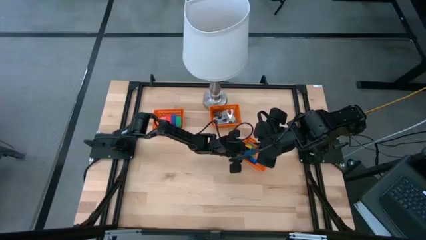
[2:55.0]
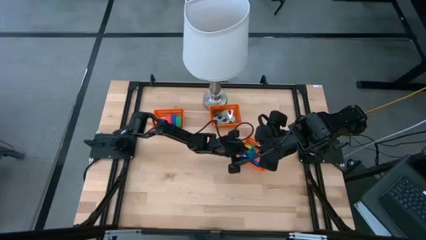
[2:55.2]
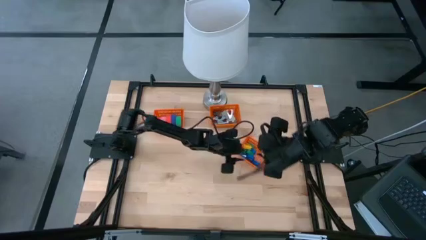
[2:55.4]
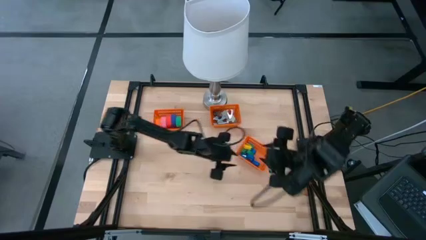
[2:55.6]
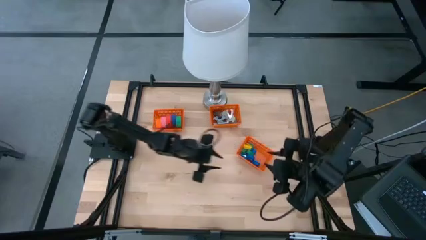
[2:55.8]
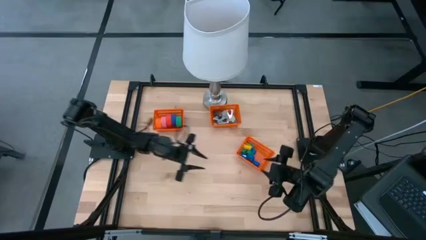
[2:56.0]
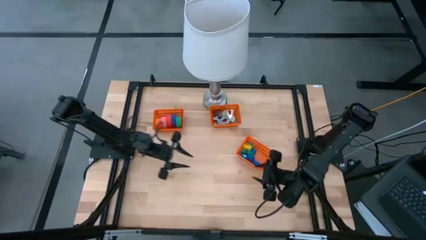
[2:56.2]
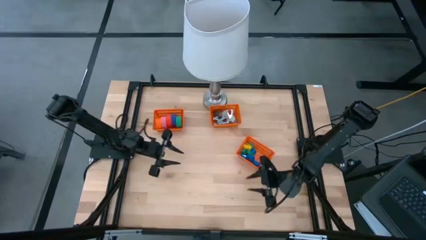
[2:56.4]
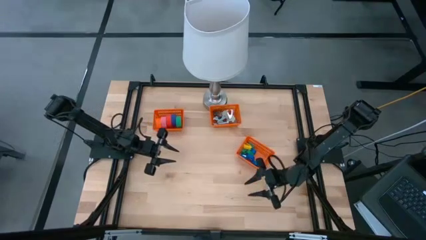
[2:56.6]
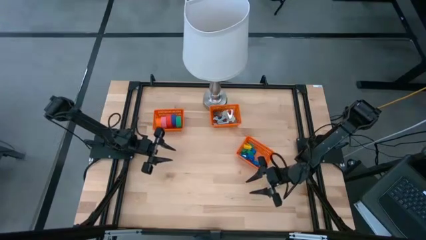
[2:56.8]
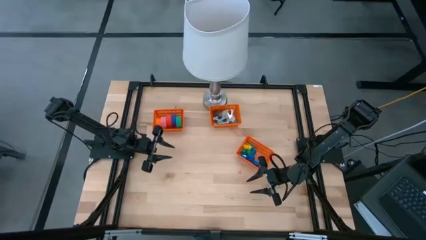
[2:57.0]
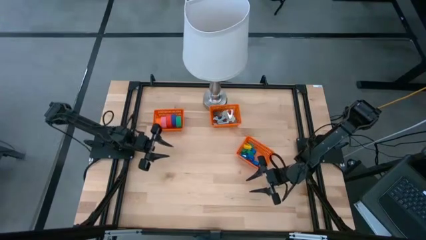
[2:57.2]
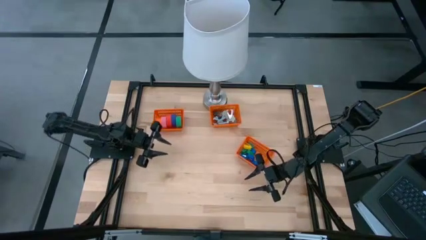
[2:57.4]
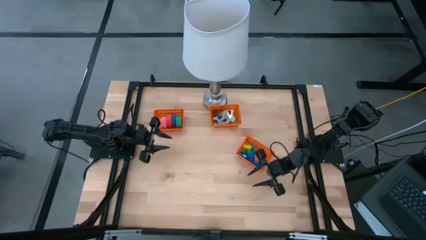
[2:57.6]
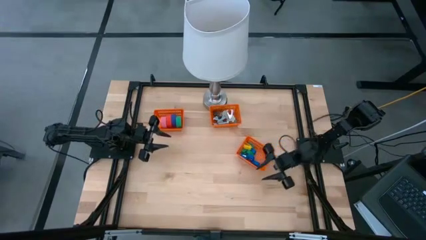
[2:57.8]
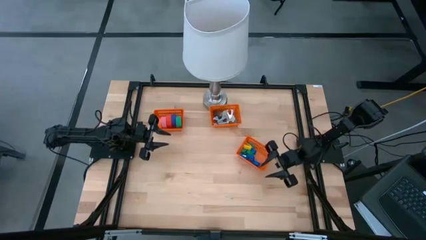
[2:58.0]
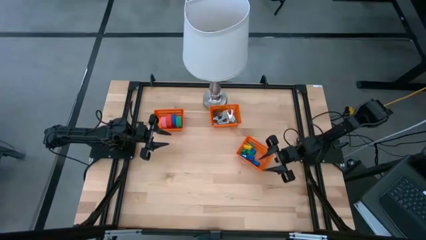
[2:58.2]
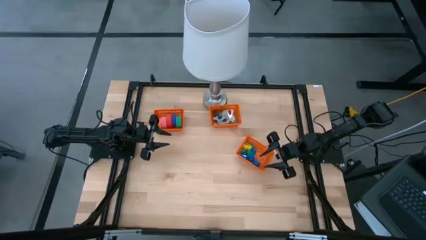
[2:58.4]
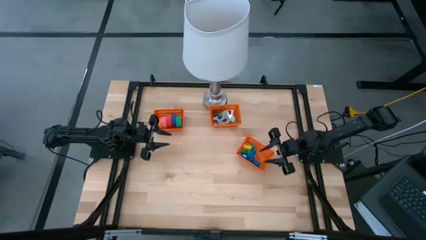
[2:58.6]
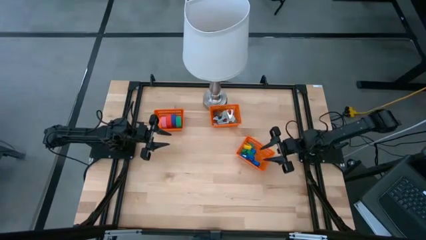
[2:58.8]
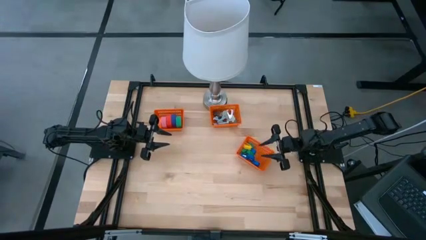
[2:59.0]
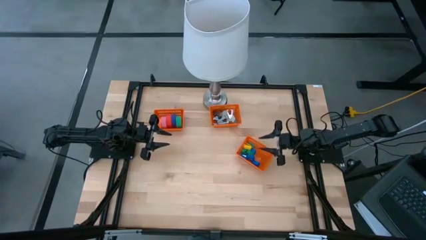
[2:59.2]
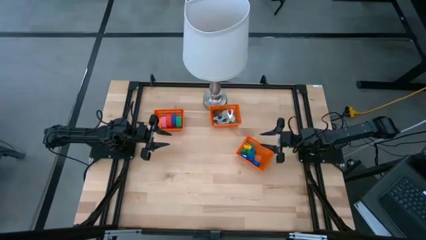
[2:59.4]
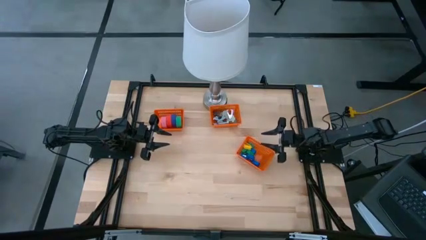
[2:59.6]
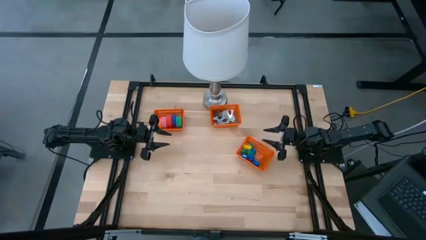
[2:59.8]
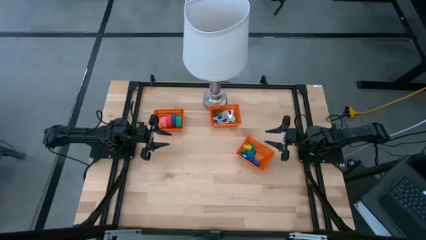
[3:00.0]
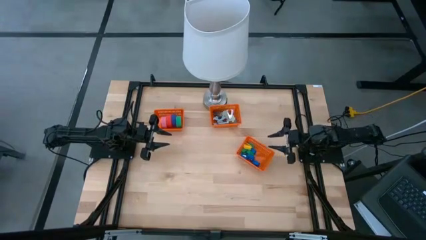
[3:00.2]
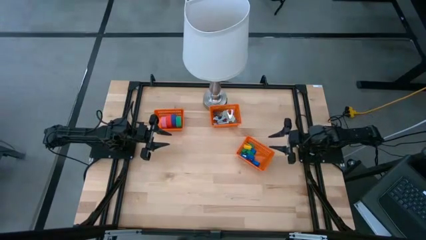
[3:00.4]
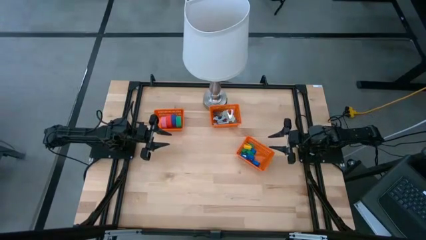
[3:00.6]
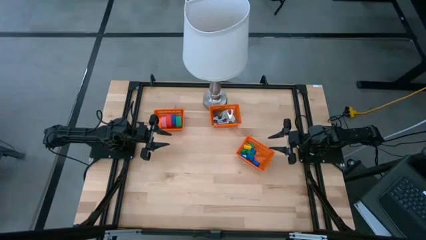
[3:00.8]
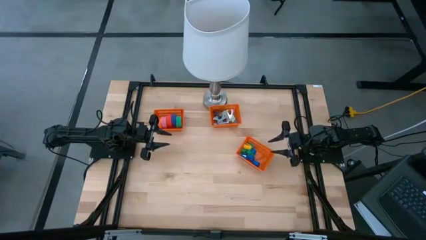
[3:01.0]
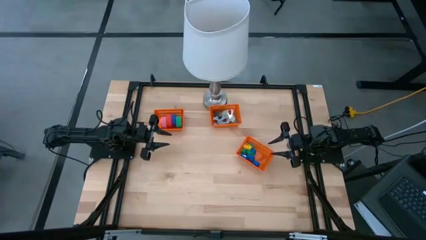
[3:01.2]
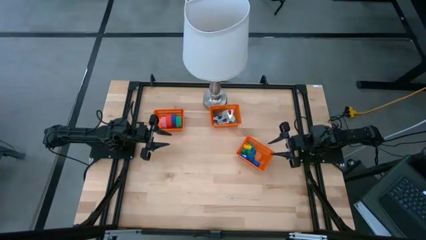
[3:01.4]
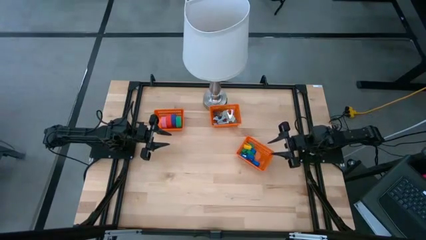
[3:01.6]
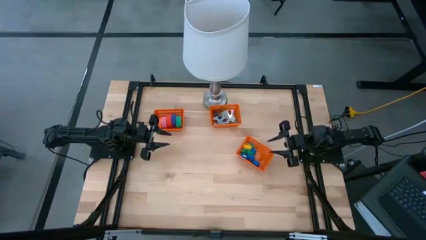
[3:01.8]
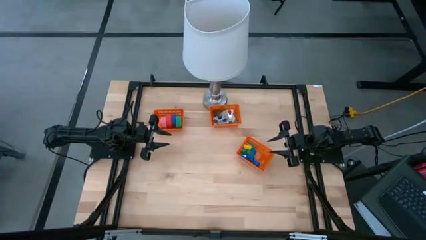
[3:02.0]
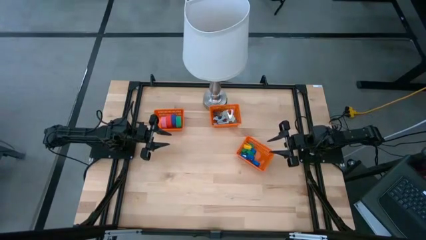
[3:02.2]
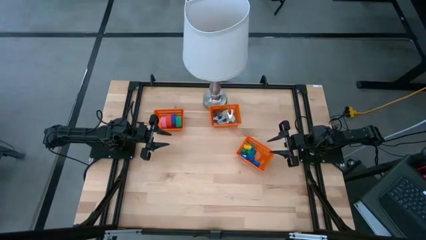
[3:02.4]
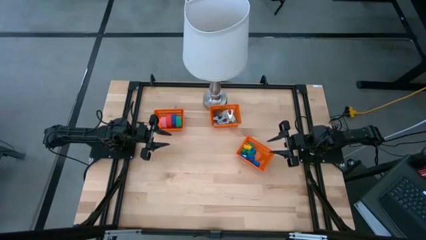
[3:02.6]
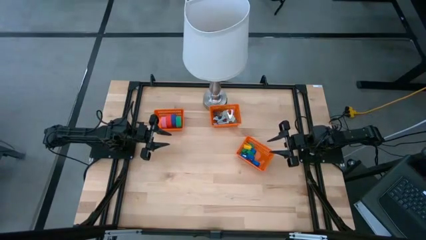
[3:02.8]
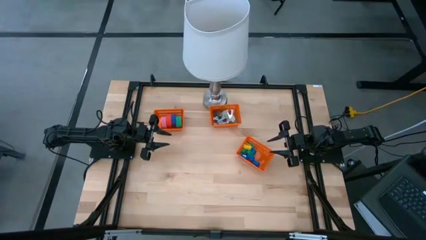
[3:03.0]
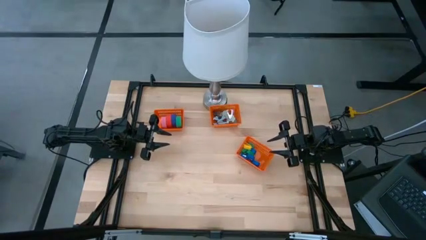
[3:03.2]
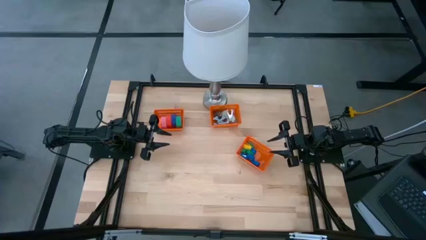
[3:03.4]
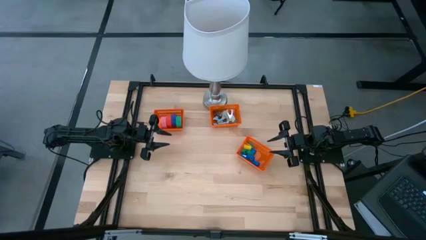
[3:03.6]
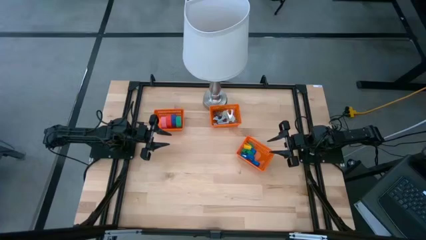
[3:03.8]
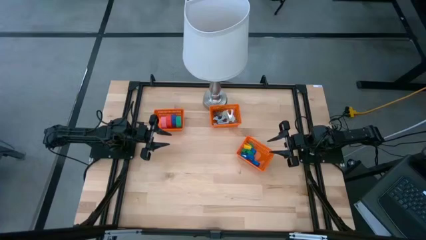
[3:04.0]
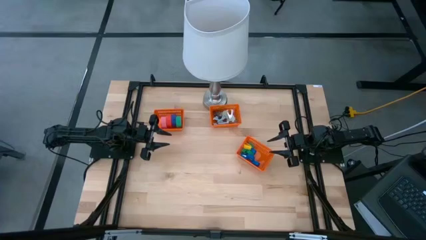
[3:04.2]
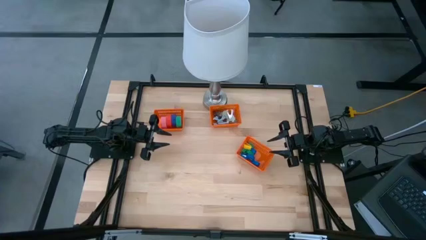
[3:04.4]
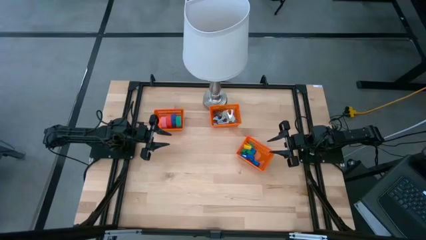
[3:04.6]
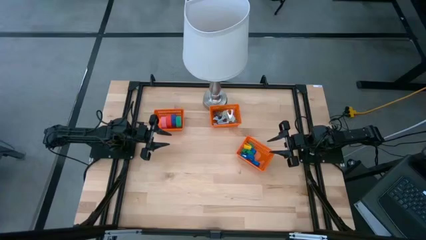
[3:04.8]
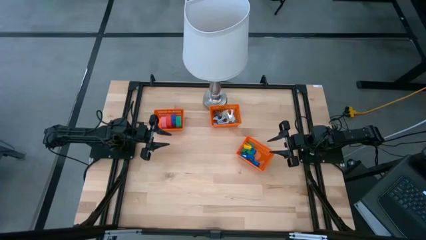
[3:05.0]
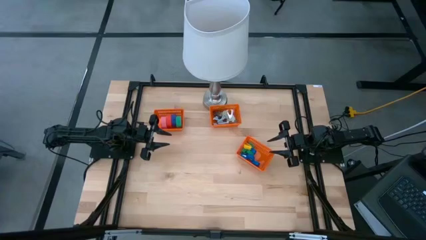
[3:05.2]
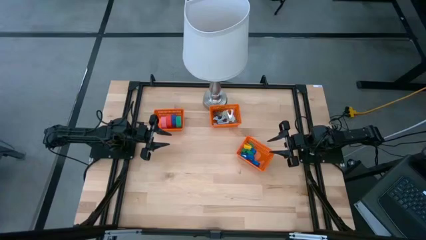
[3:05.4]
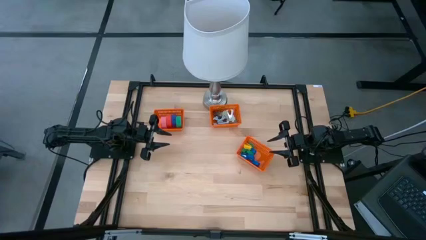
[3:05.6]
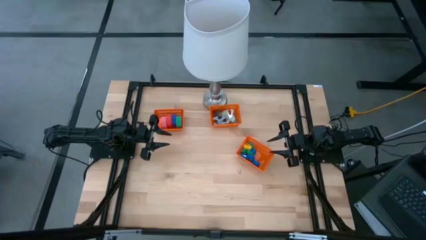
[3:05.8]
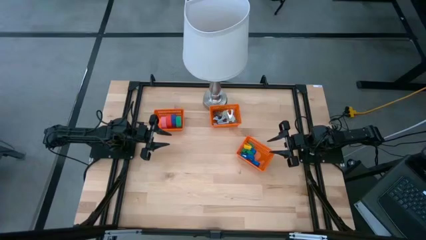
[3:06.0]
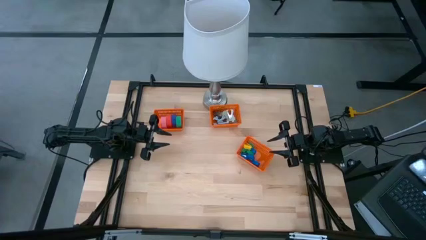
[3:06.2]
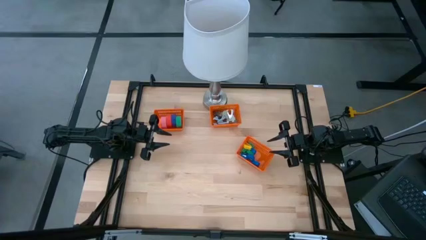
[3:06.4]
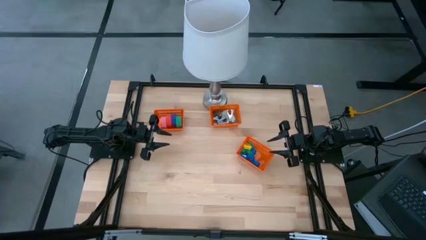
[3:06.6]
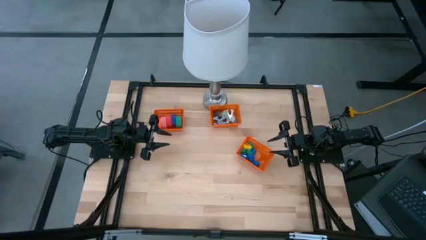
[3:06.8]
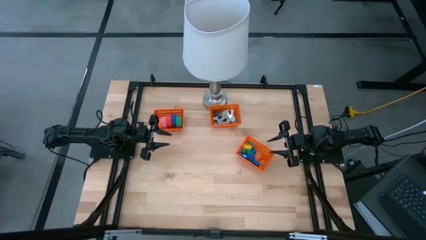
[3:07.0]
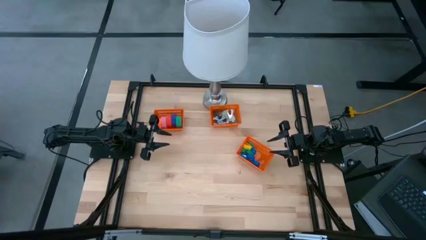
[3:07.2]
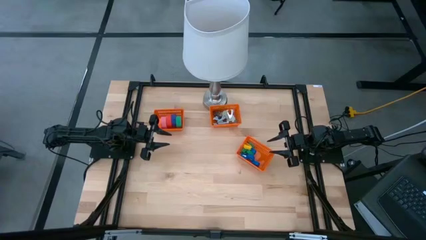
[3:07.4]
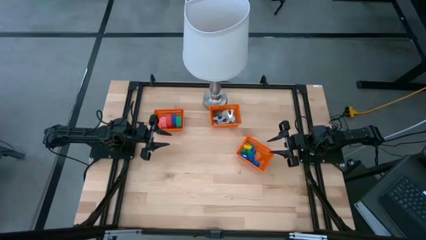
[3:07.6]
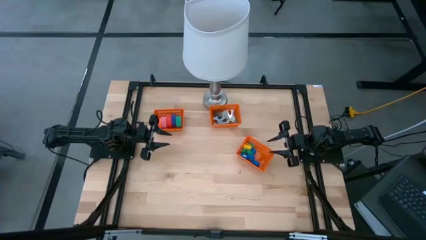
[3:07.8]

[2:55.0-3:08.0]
Task: Pick and place Stapler, Stapler remover, tape
Return to Home Position
